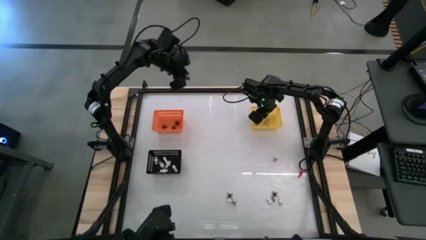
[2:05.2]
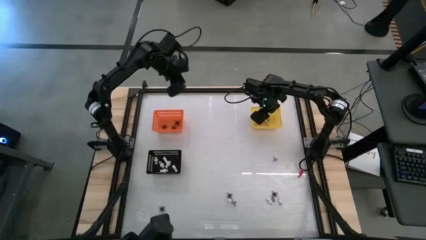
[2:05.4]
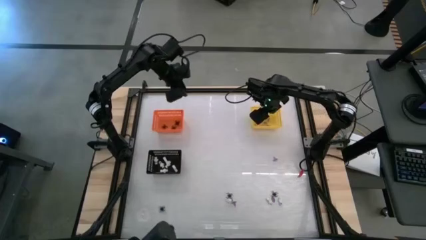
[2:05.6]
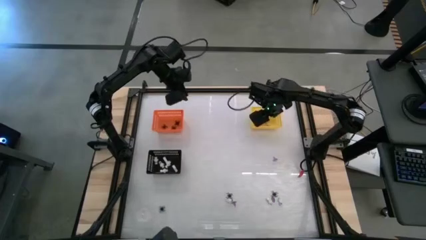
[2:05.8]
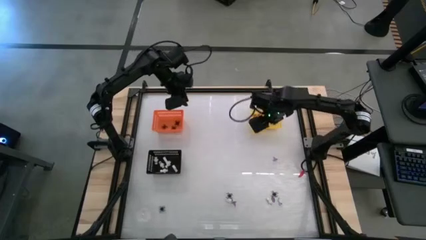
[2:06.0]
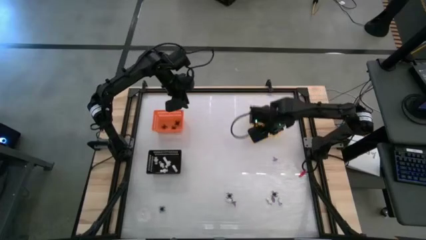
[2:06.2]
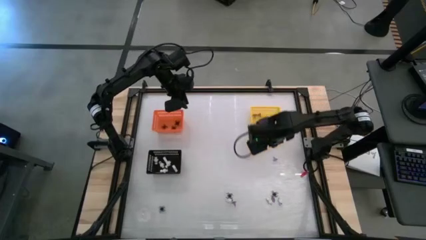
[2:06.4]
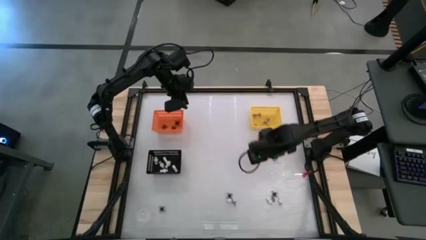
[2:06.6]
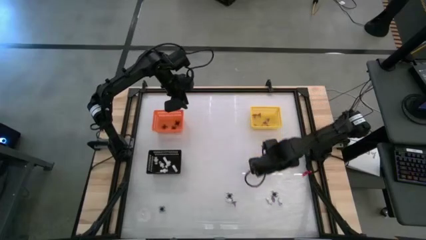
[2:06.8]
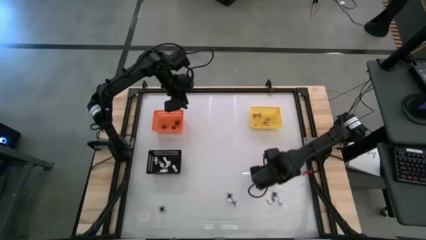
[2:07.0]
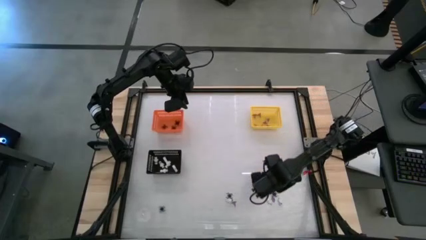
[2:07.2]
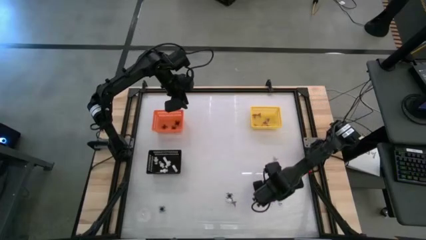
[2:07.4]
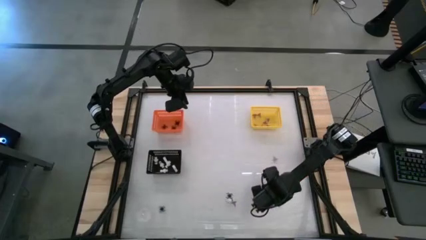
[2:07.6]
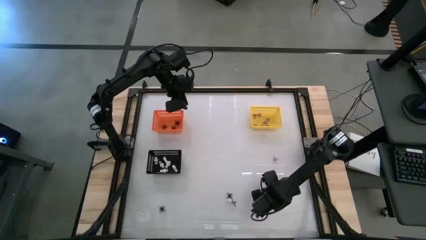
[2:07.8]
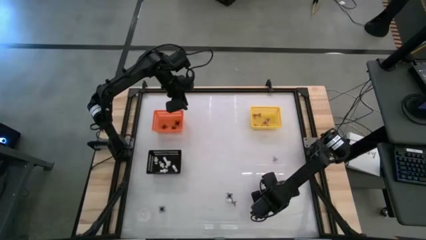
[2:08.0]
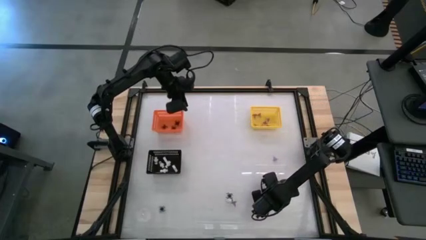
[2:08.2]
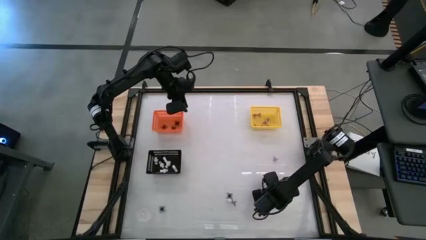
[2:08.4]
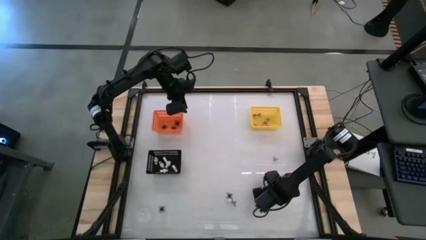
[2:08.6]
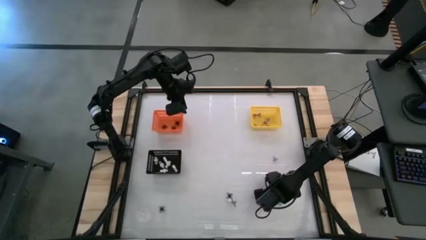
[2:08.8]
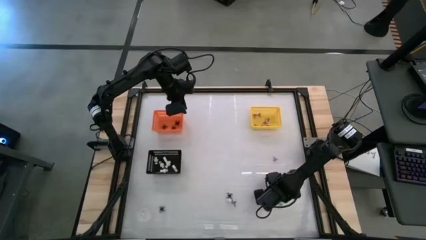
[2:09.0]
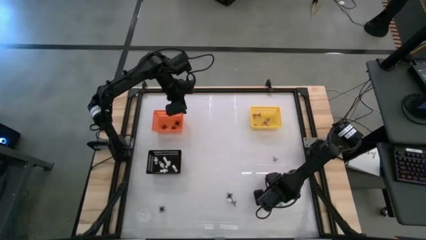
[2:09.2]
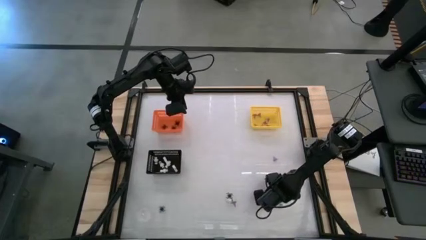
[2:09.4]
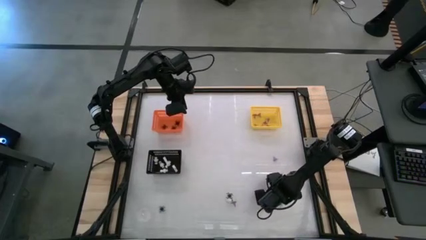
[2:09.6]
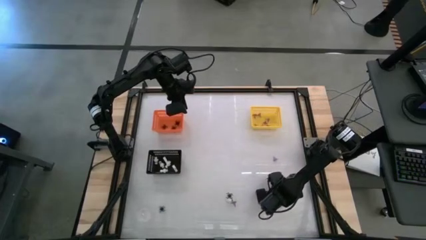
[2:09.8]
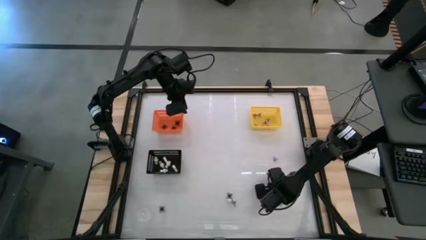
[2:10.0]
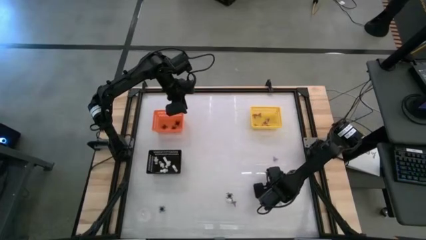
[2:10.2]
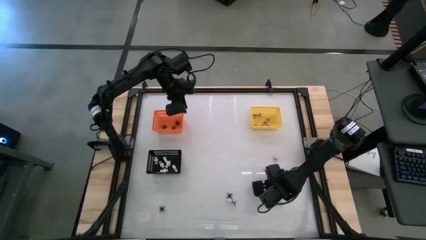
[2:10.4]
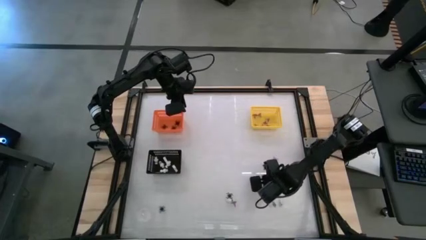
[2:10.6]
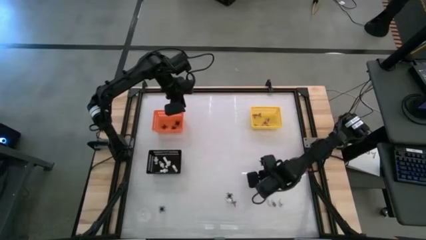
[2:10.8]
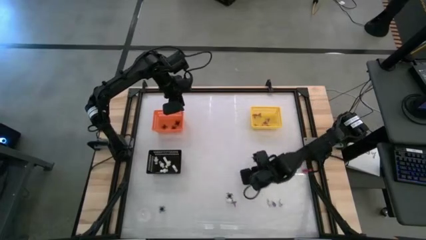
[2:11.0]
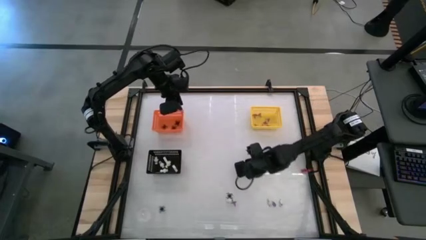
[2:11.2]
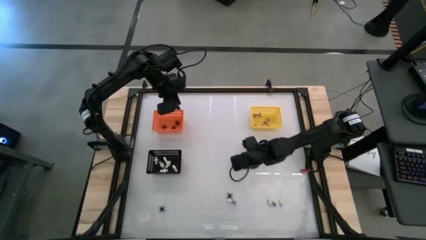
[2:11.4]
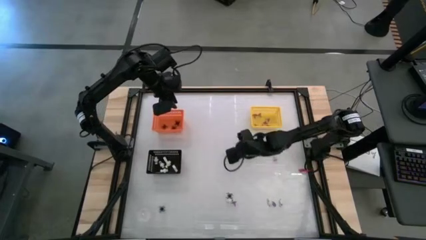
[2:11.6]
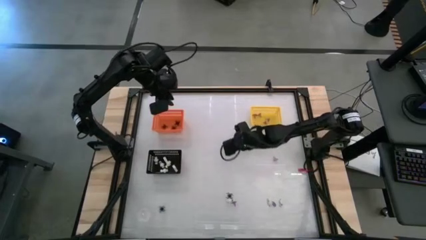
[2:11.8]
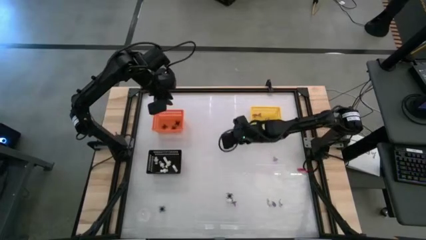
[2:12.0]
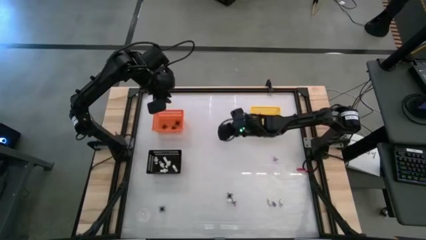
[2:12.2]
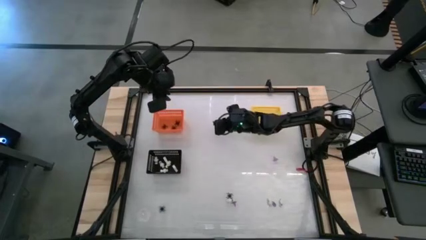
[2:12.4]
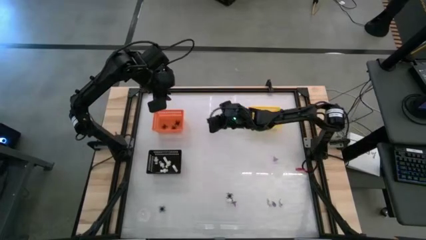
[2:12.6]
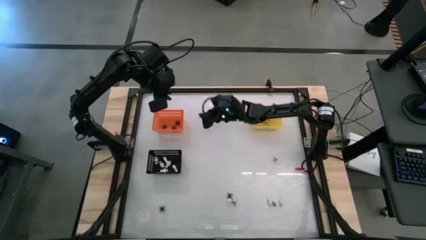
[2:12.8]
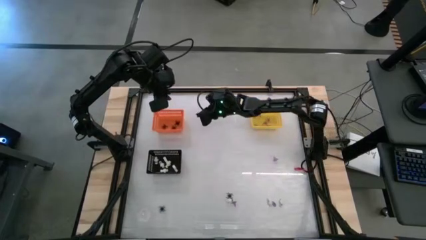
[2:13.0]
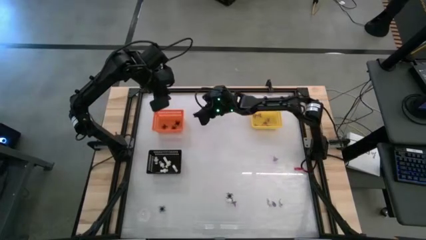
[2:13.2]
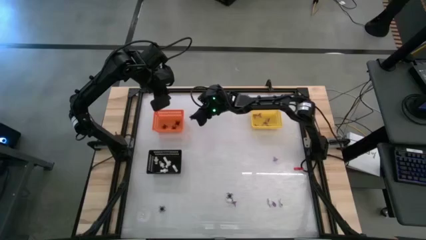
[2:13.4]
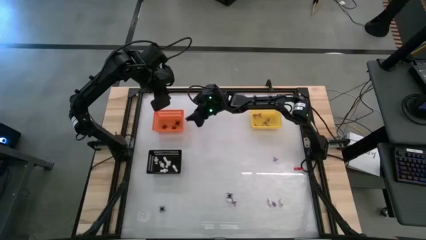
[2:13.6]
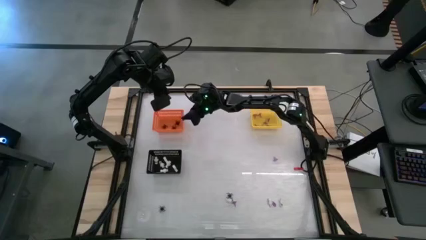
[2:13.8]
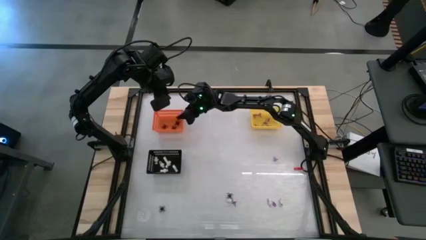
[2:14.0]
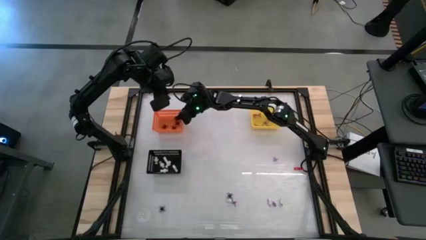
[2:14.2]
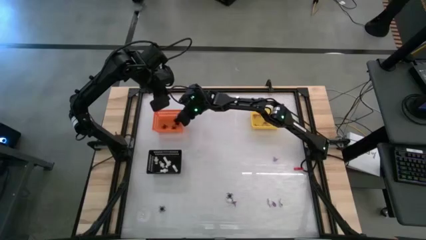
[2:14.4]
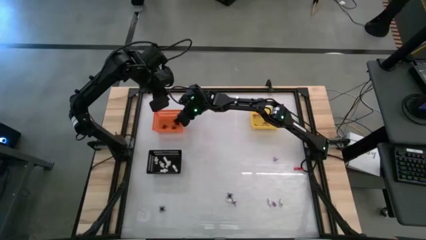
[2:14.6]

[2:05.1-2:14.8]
Task: Sort Halloween decoration
Put the black spider toy into the orange bin

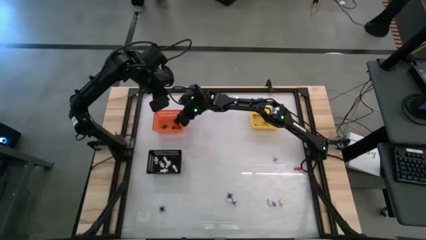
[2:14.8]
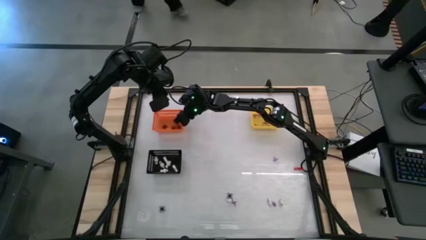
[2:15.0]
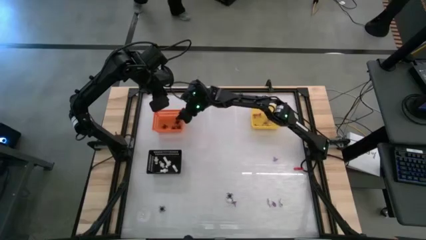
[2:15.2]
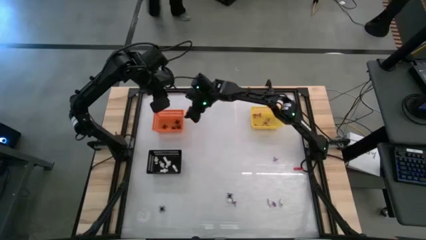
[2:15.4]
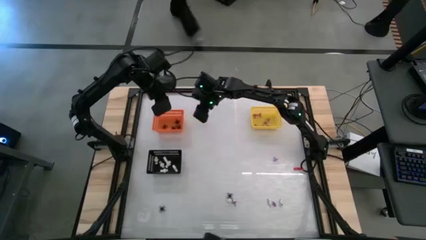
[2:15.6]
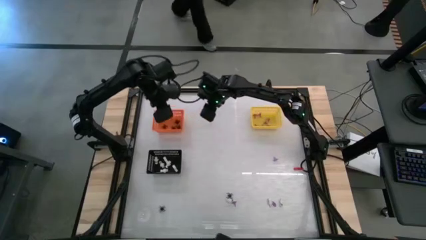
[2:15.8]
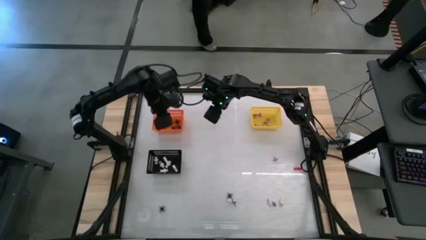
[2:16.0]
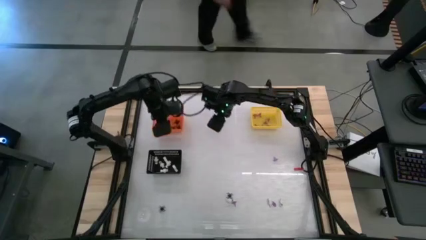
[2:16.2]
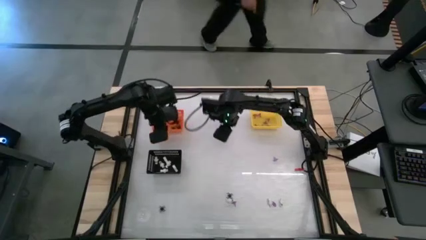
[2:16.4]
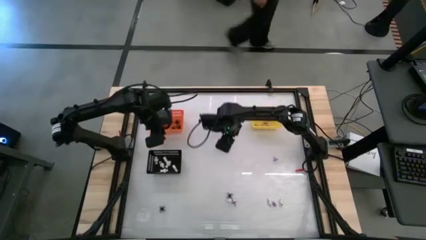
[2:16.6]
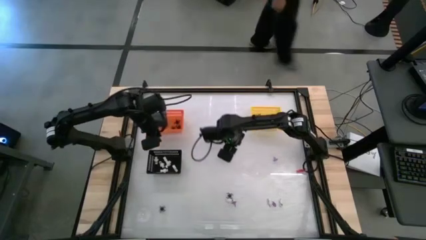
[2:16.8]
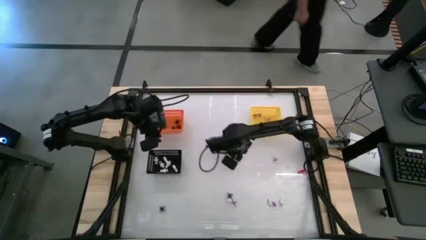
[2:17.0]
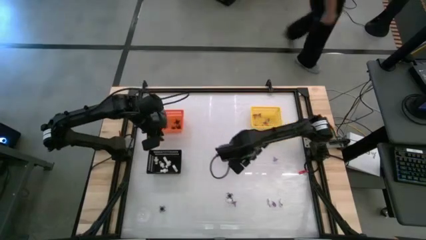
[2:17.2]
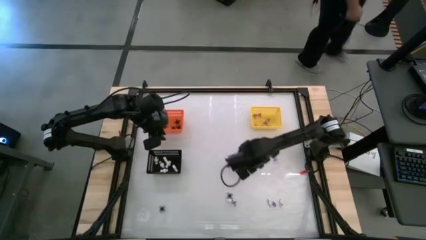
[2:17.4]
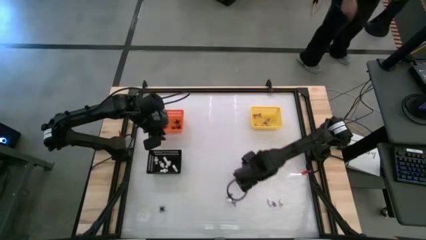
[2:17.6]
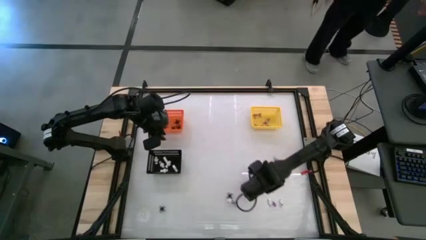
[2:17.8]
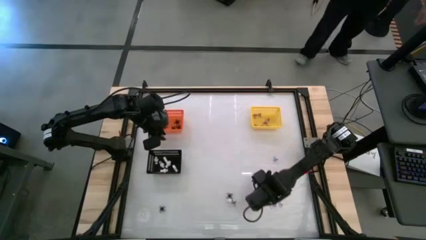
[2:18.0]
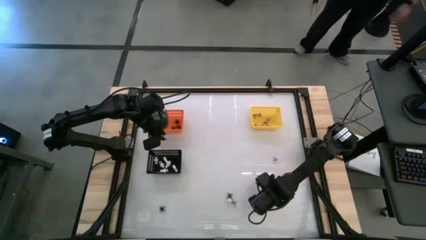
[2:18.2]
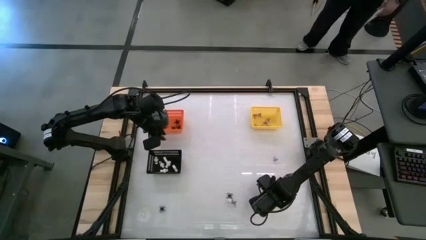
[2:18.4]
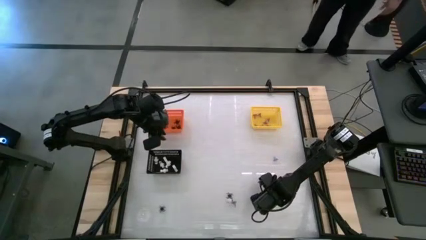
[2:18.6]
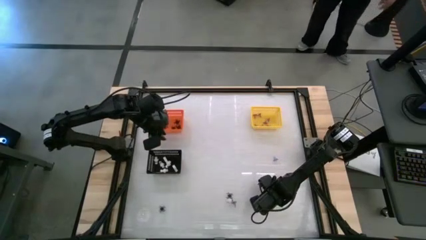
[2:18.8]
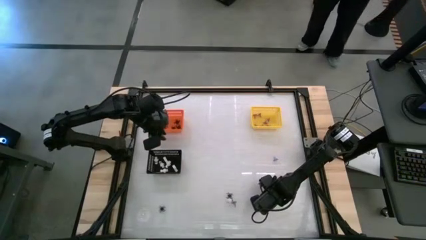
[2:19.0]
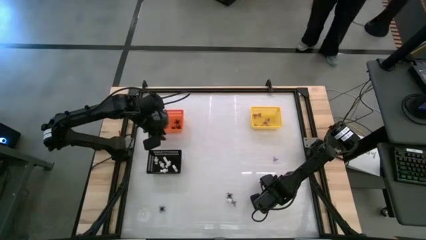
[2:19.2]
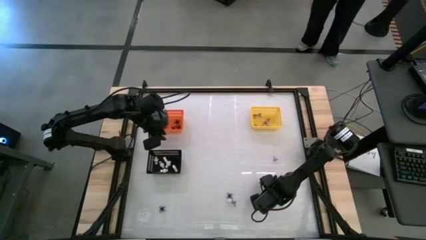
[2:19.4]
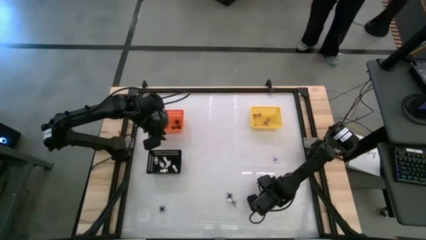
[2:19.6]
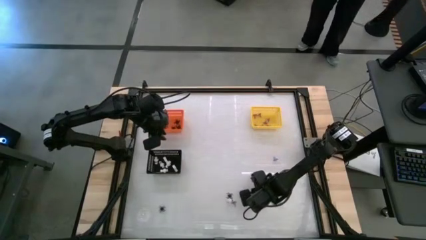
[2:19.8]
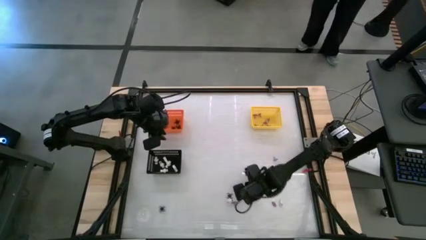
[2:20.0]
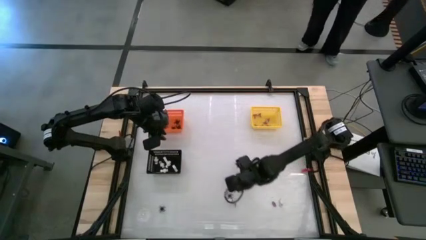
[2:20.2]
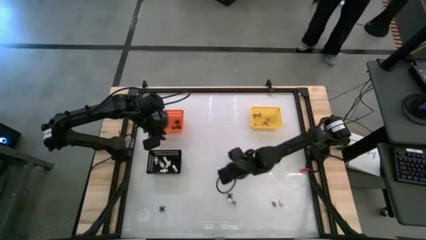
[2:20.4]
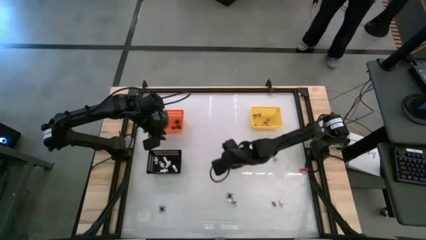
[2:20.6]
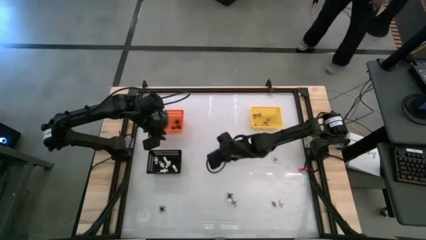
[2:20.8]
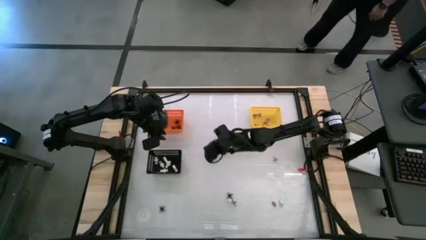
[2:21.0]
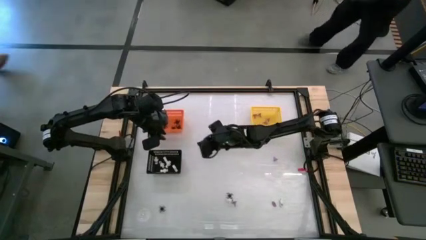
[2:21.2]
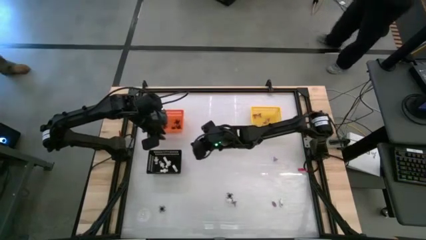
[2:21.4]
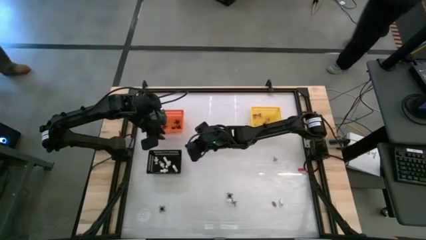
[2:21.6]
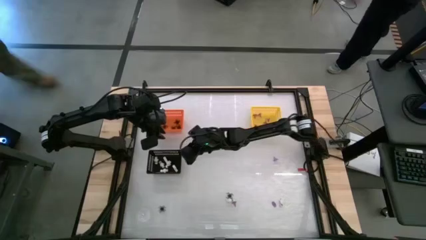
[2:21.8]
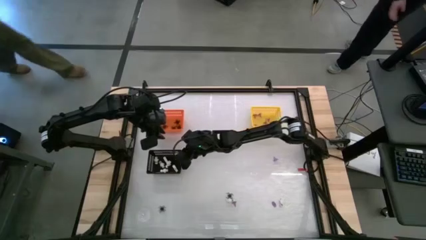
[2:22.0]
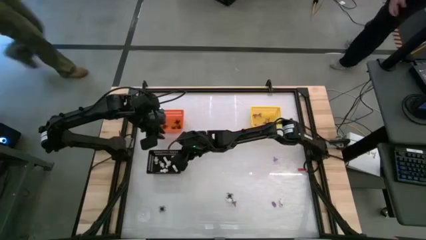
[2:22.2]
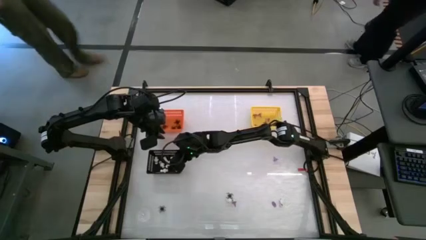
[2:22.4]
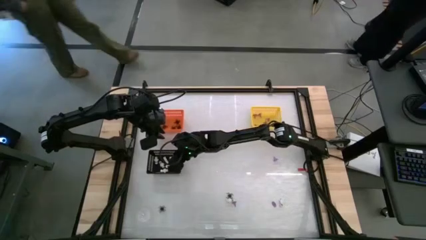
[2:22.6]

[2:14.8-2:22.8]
Put the white skeleton toy into the black bin
